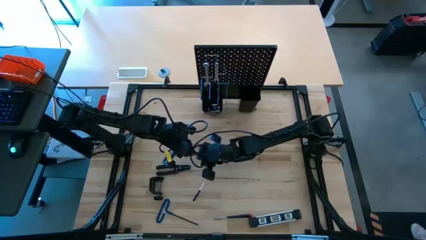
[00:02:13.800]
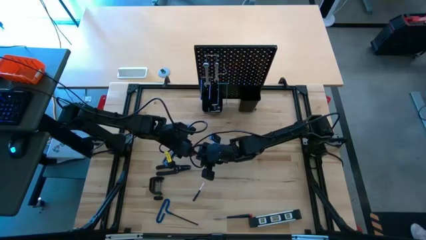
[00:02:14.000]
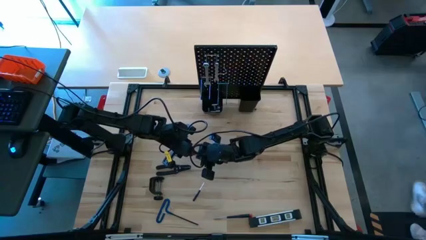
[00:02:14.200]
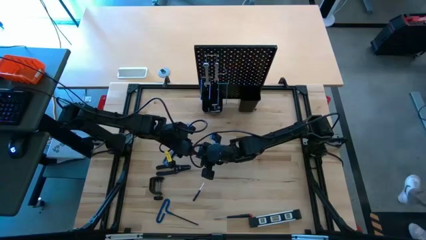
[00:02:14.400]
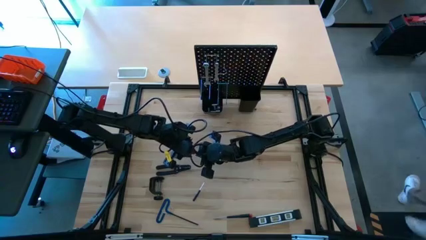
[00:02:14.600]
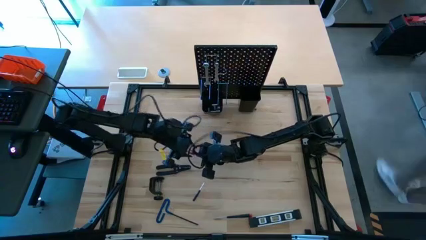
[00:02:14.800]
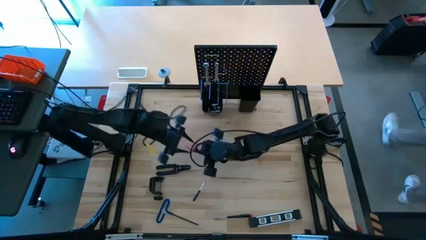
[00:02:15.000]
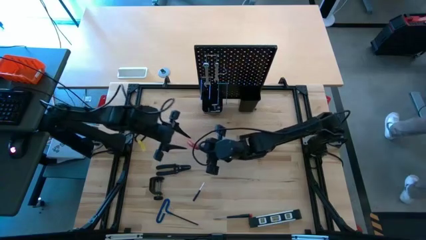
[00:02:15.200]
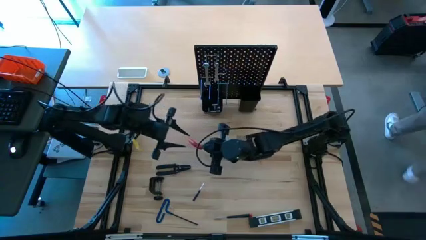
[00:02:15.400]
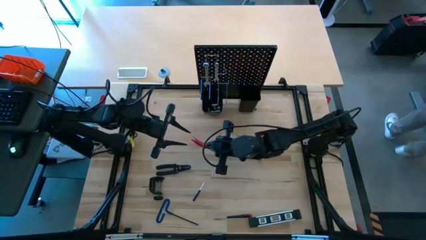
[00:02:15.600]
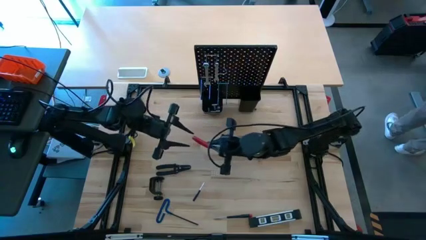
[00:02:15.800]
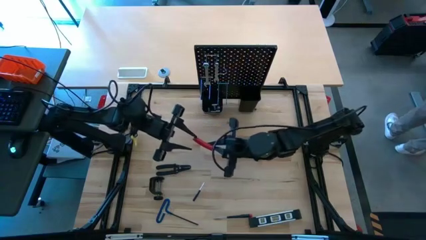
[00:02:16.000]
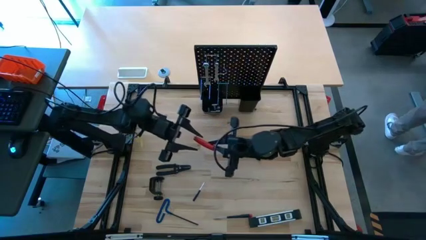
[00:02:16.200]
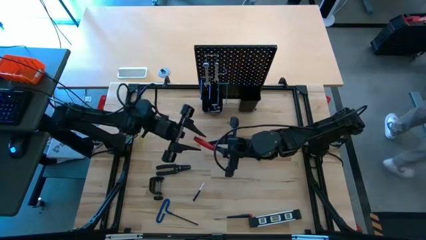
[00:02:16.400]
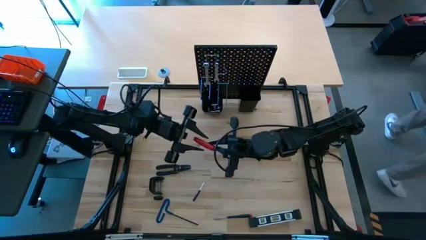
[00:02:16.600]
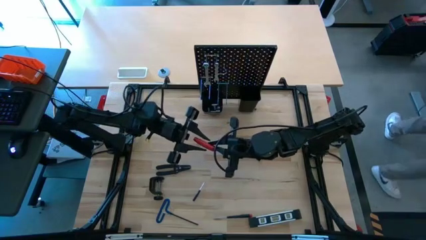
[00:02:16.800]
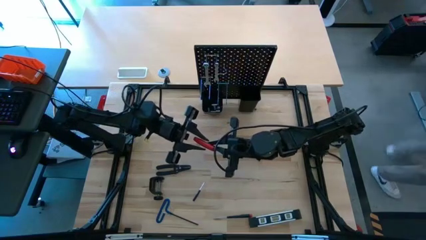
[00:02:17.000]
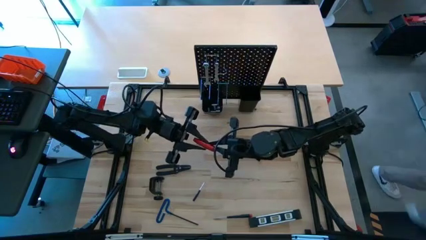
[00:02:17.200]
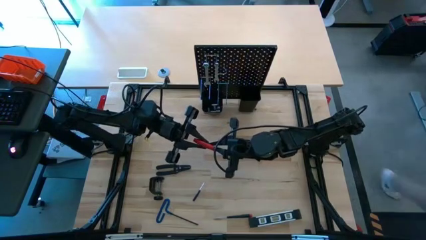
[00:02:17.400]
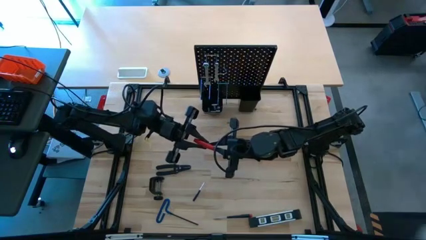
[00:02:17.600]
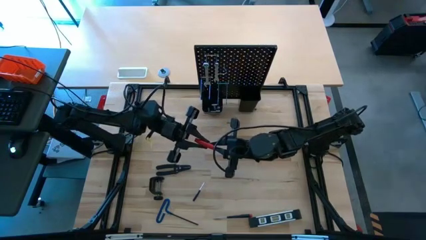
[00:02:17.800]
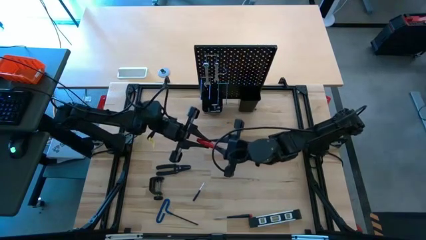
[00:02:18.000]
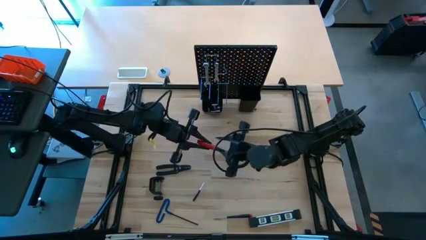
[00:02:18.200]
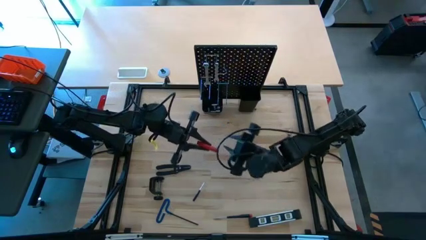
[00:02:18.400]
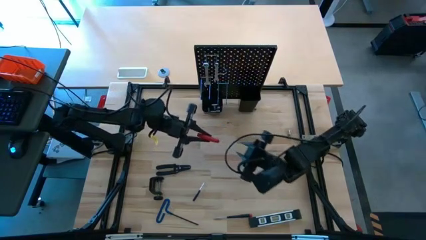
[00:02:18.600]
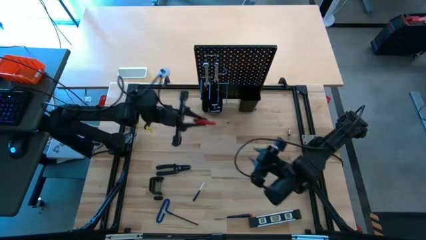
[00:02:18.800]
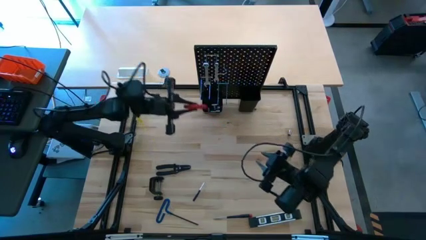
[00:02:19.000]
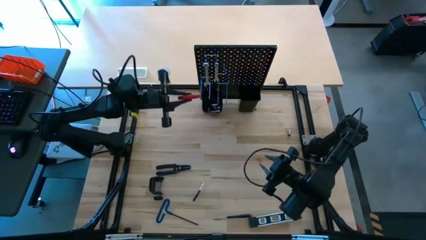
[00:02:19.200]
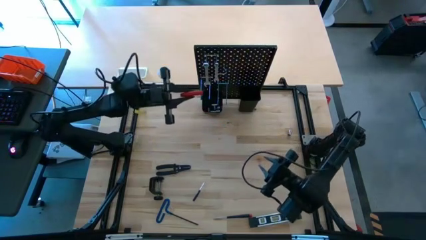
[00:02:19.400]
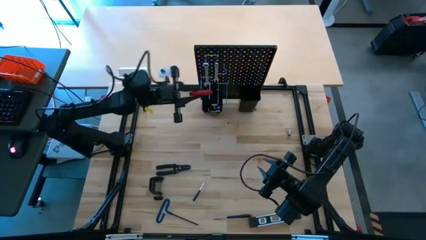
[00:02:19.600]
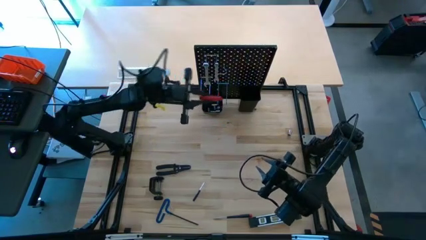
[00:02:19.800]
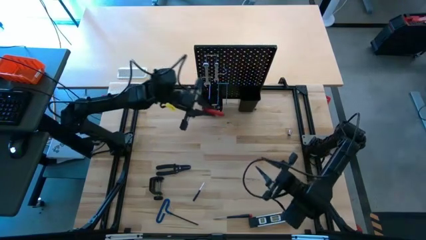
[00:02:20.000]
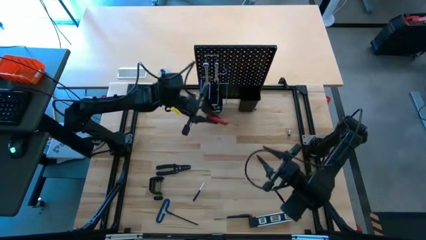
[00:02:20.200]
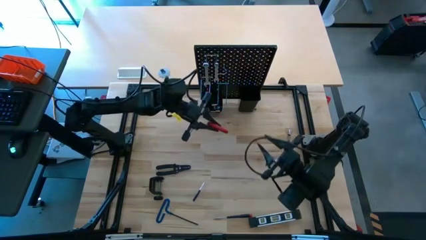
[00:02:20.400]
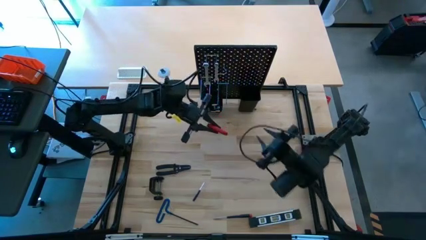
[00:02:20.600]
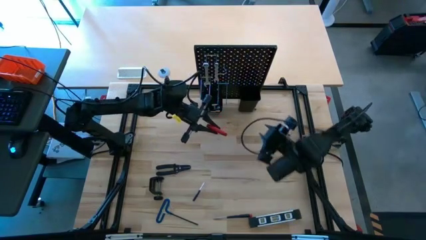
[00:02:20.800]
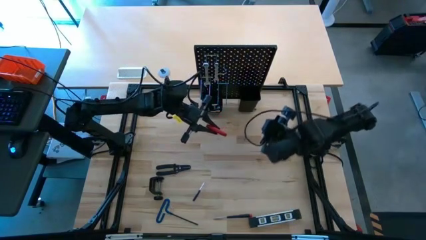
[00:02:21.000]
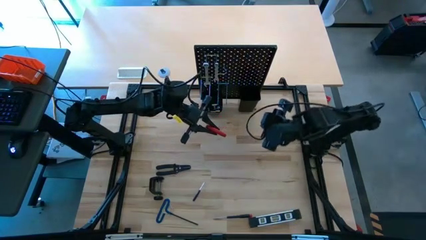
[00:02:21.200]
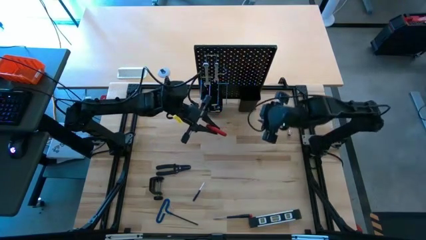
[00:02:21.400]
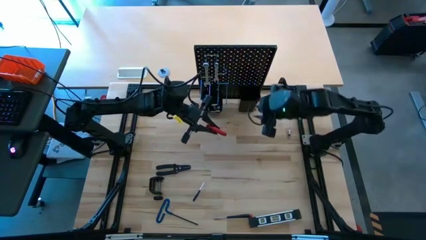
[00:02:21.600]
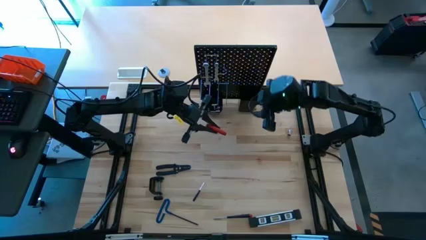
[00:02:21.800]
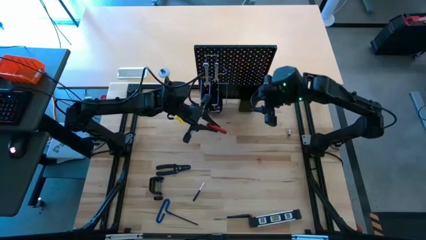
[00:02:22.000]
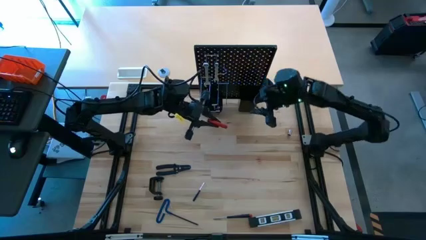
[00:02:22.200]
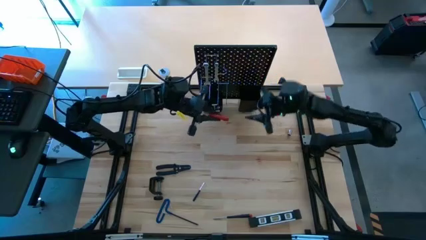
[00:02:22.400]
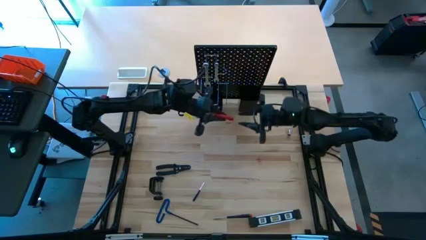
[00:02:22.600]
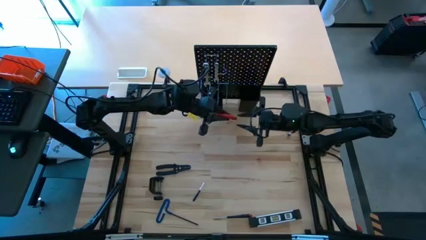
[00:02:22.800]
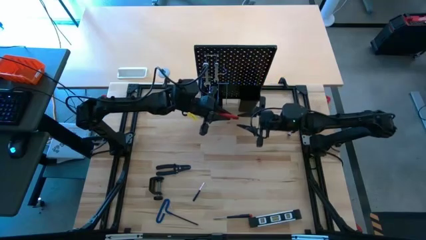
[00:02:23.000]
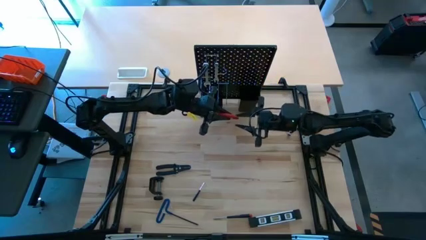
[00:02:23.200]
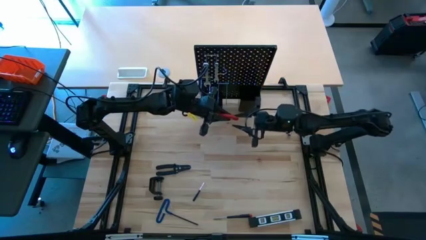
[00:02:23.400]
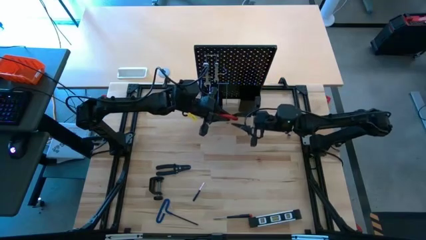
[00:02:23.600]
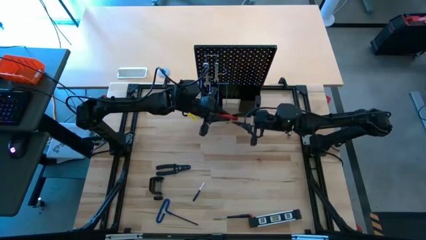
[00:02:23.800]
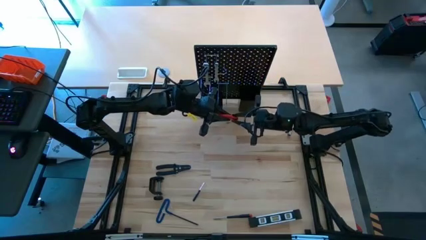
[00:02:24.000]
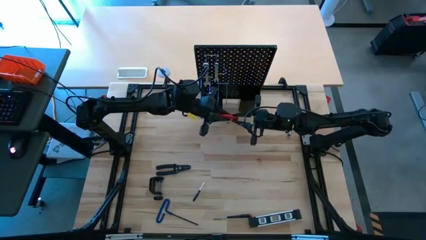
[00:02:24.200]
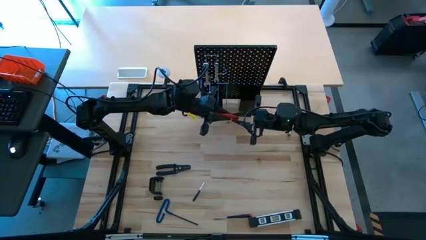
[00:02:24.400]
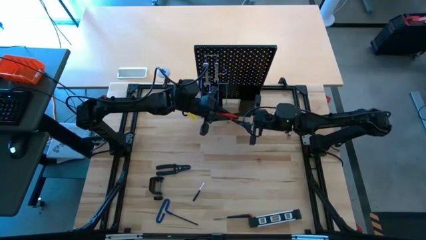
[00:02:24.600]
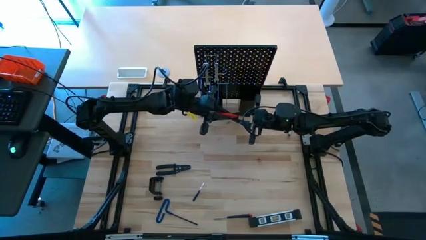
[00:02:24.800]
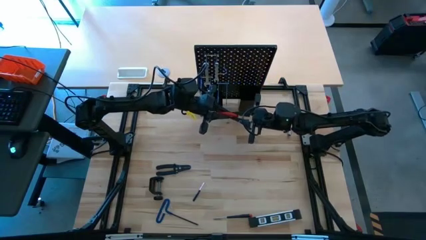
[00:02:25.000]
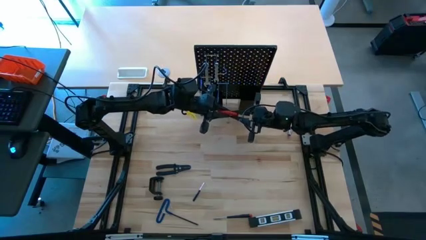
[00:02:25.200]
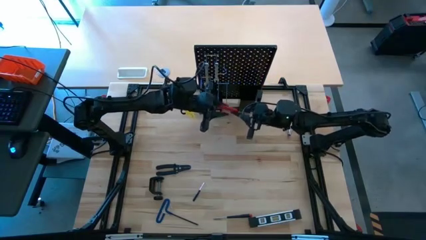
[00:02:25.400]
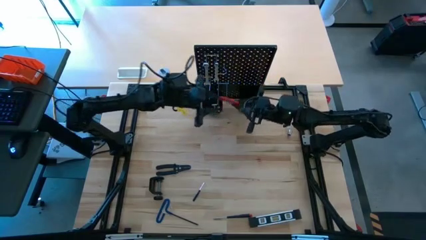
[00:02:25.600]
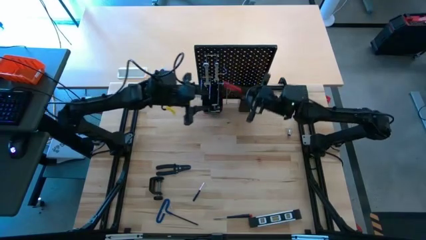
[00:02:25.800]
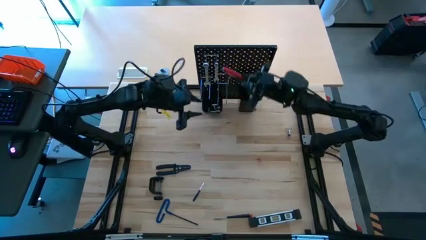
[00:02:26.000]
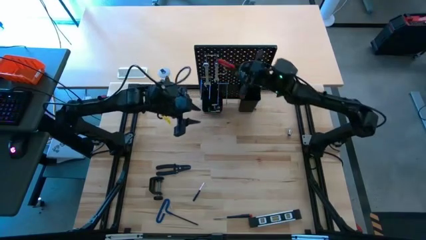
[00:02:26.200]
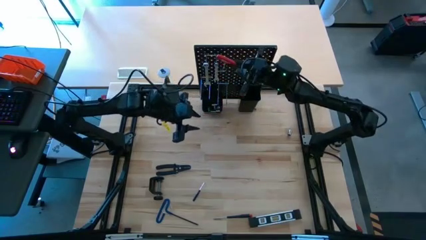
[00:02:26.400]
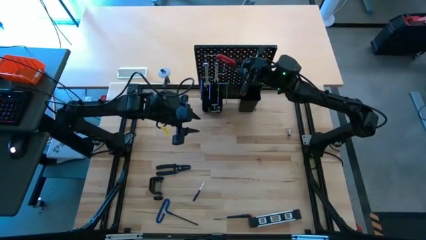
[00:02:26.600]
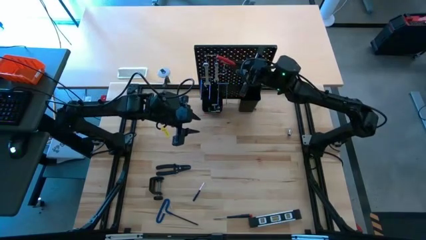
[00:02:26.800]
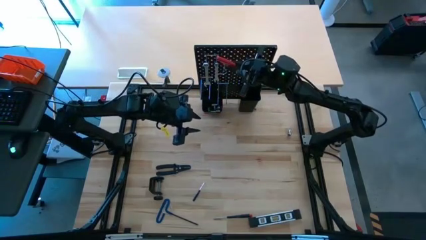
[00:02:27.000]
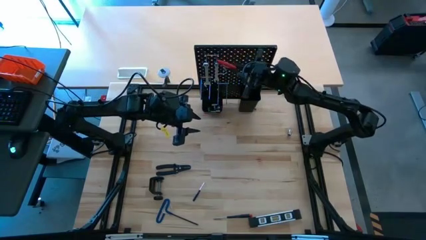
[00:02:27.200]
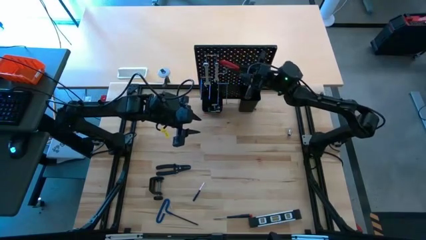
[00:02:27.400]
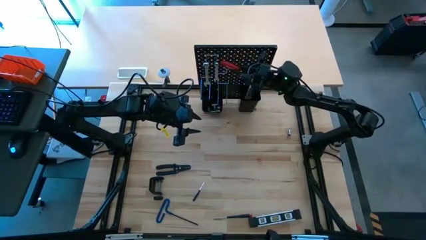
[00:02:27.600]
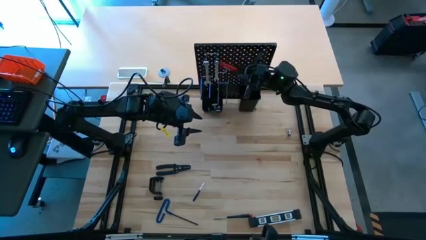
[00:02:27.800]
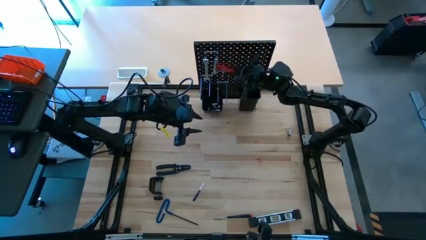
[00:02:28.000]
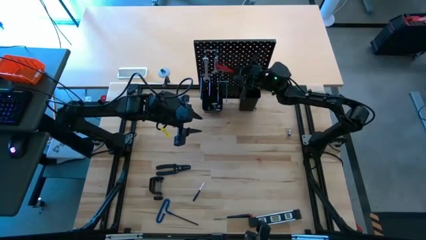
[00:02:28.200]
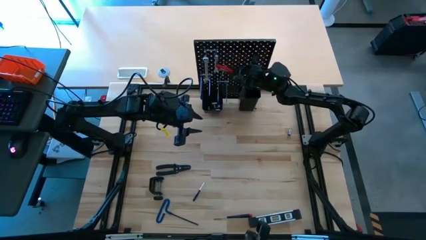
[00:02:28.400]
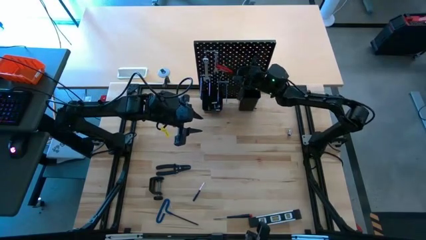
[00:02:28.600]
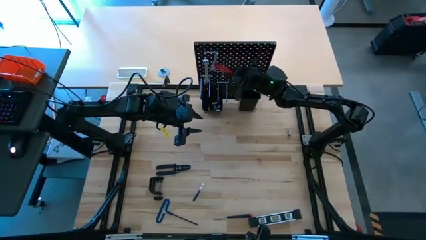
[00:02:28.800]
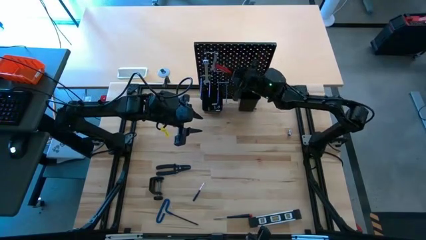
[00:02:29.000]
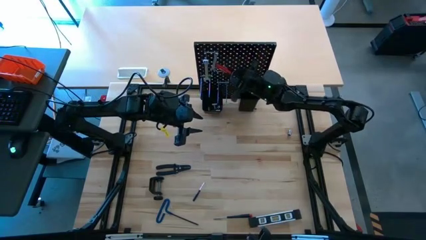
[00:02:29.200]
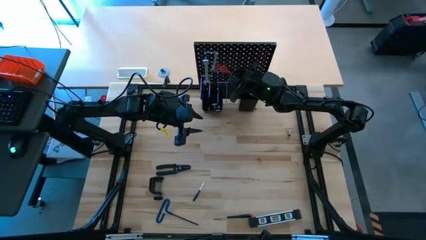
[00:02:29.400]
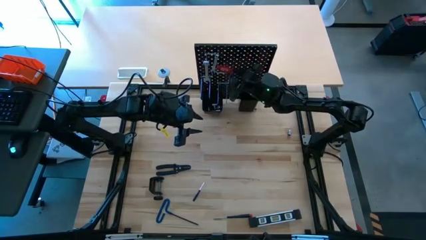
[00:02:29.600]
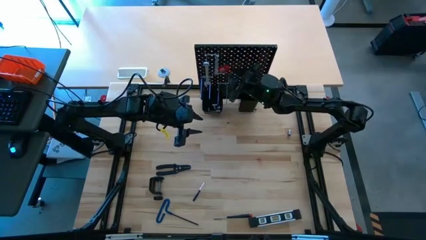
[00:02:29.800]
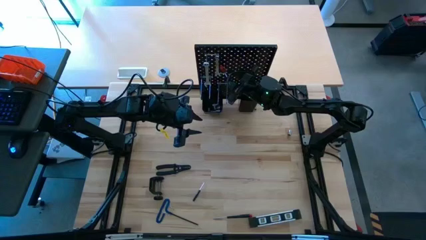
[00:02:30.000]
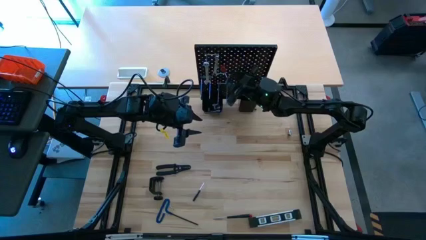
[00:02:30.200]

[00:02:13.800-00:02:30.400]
Task: Hang tools onto peg board
Put the Allen wrench into the right bin on the pegboard
